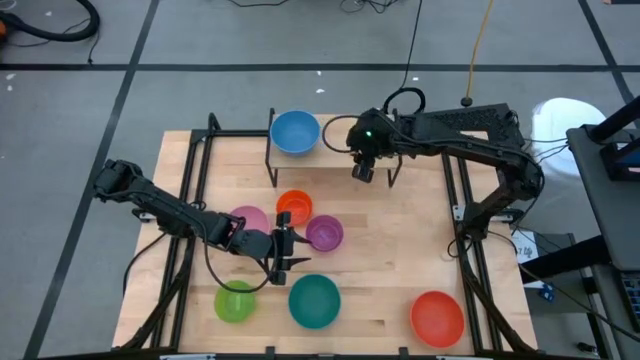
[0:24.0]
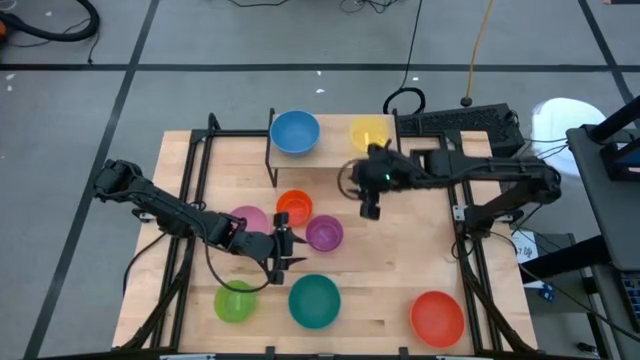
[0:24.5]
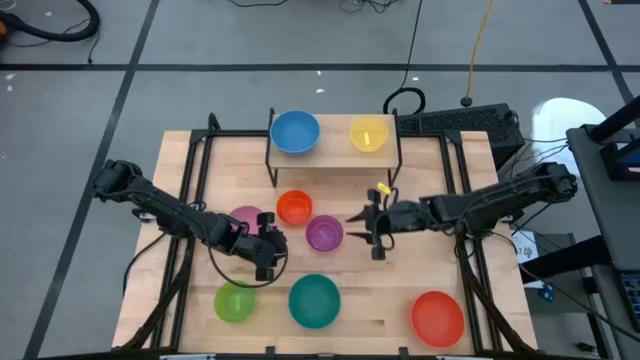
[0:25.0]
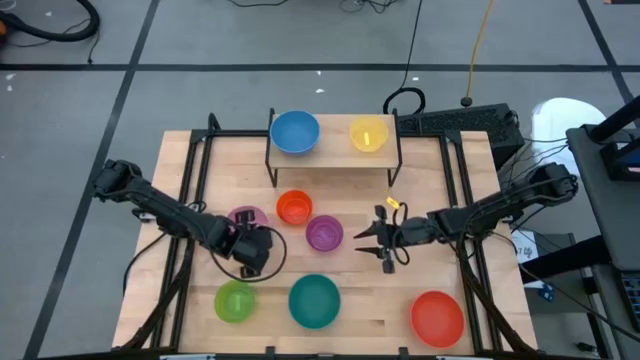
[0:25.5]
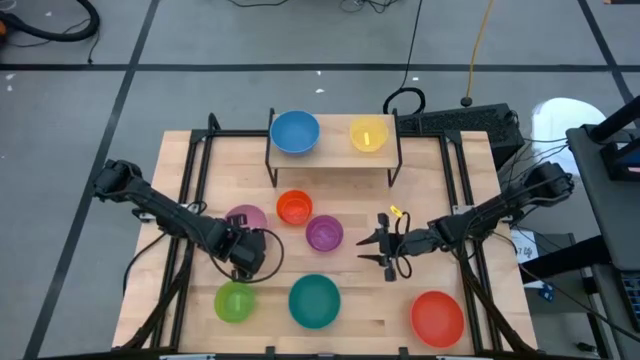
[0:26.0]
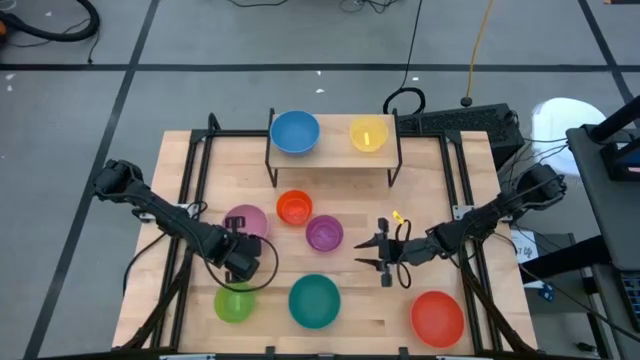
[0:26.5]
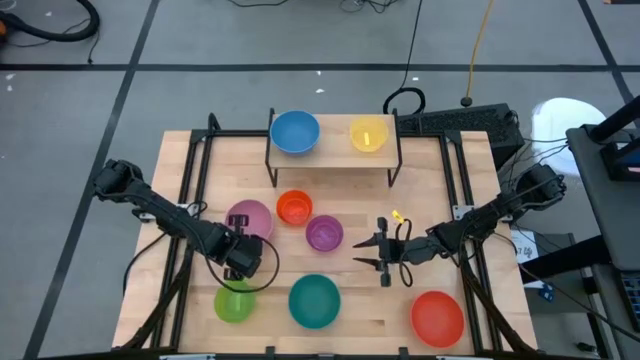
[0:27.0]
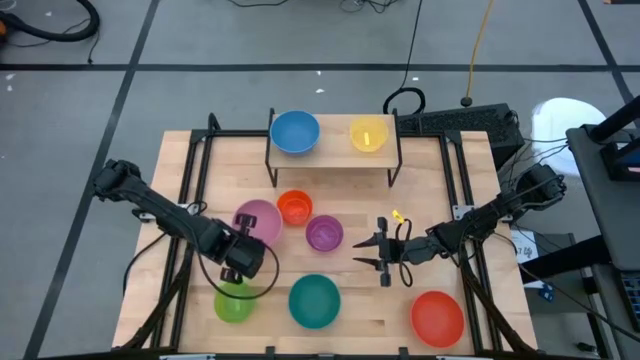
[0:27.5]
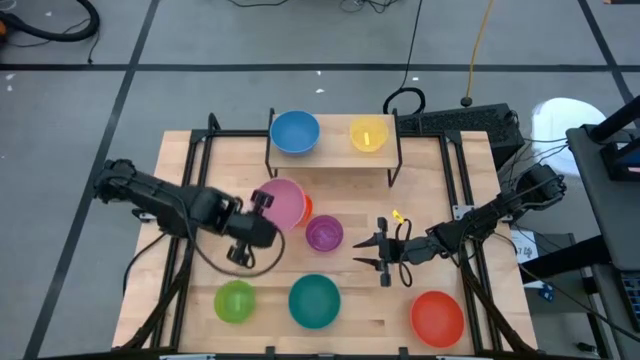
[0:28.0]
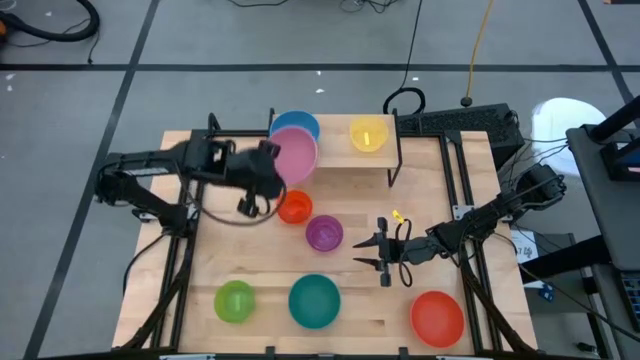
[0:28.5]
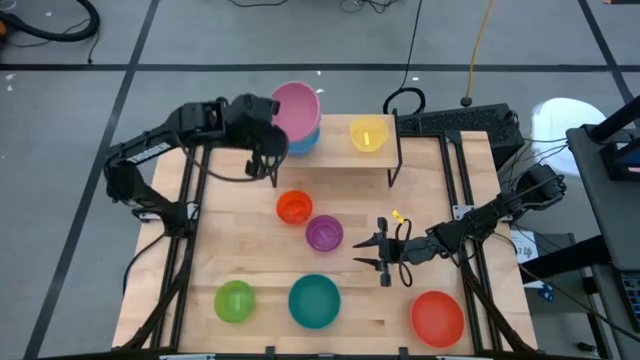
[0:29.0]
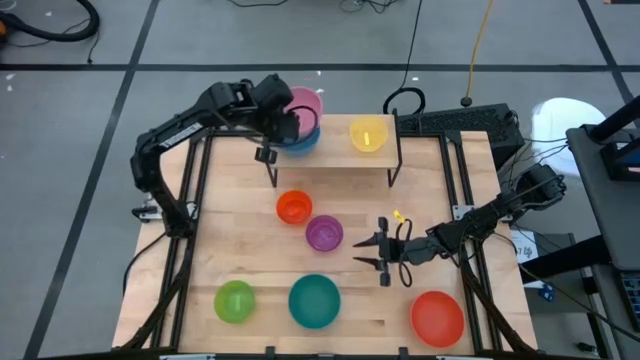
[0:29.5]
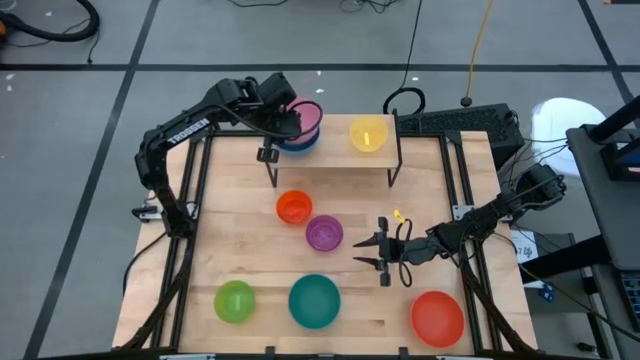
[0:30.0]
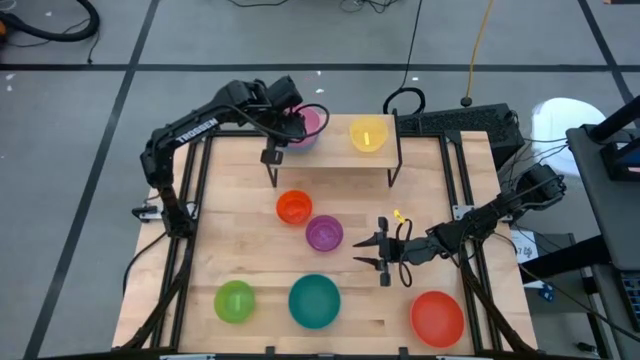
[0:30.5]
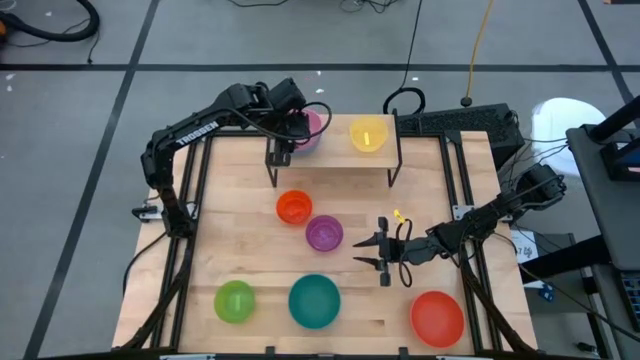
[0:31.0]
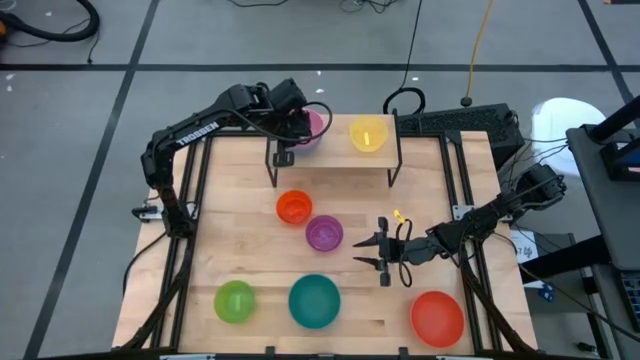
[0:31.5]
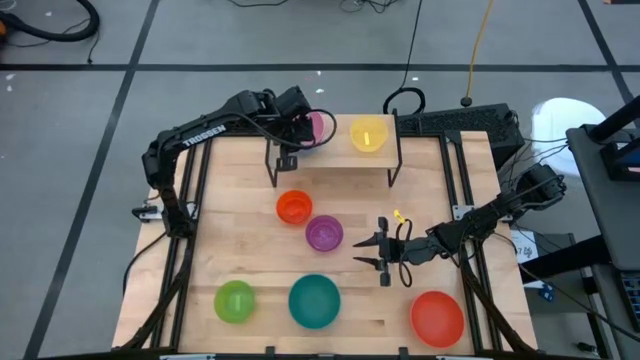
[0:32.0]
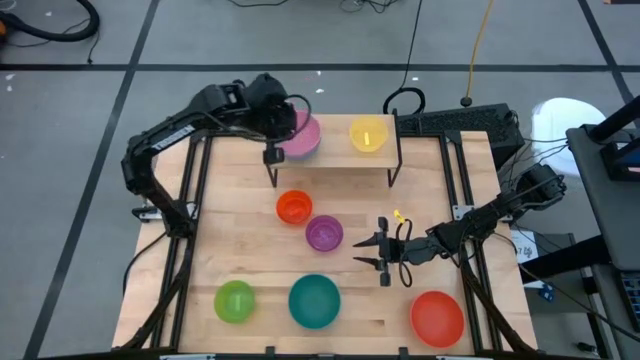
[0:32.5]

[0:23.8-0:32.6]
Task: Place and stack bowls onto a shelf
Stack the pink bowl on top of the blue bowl on the shelf

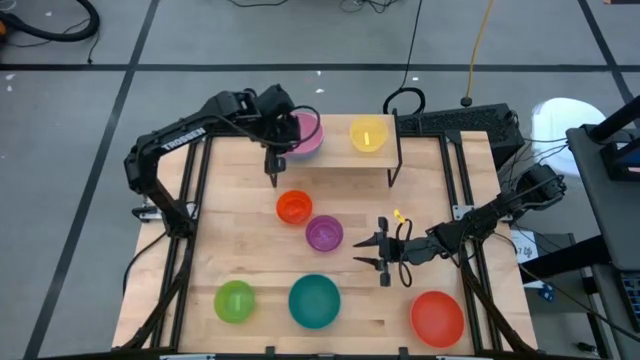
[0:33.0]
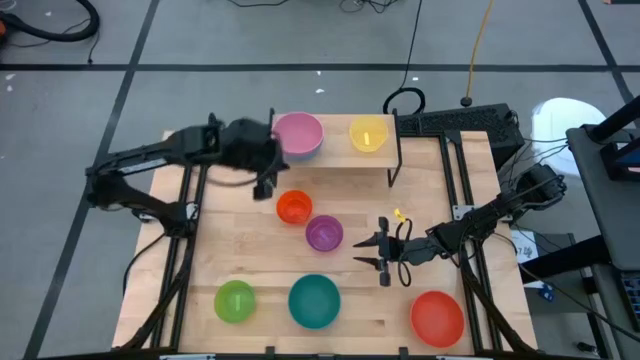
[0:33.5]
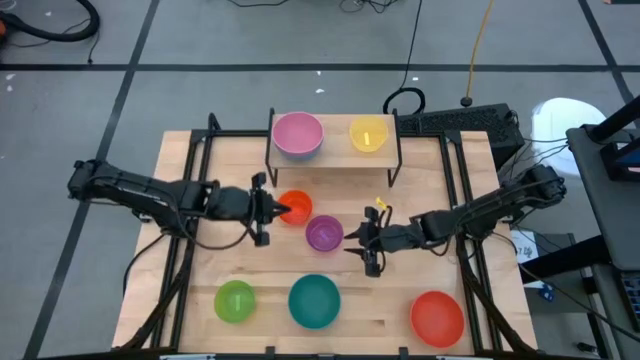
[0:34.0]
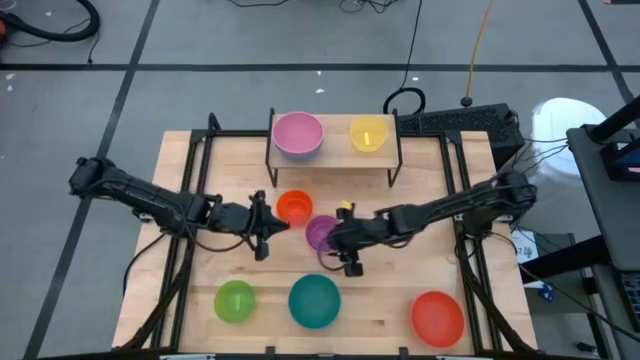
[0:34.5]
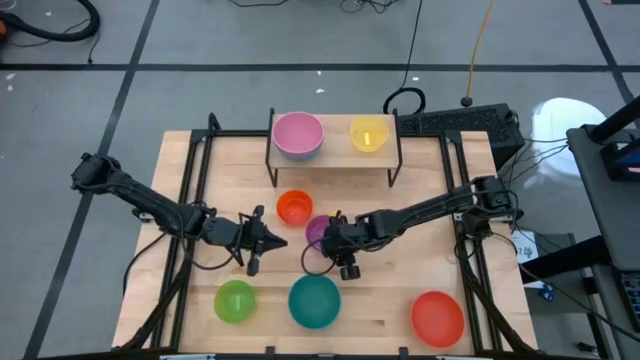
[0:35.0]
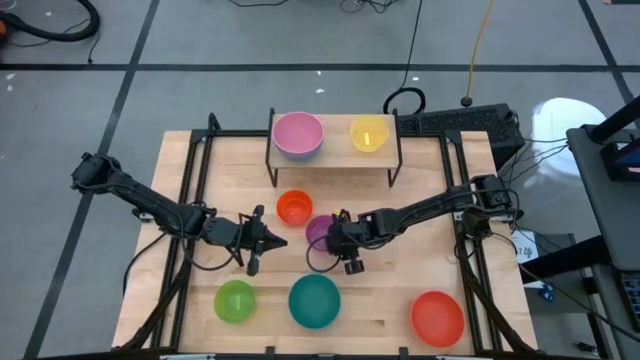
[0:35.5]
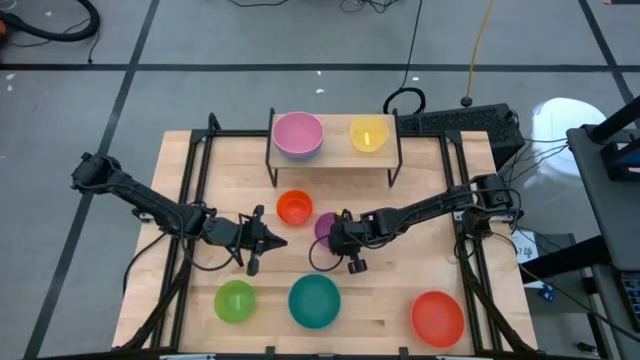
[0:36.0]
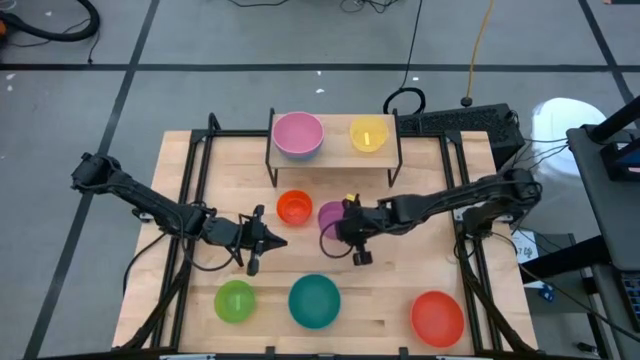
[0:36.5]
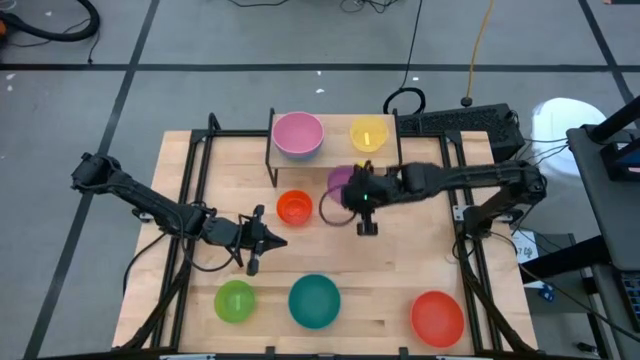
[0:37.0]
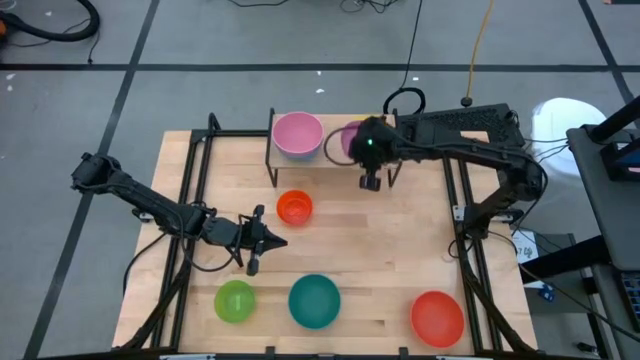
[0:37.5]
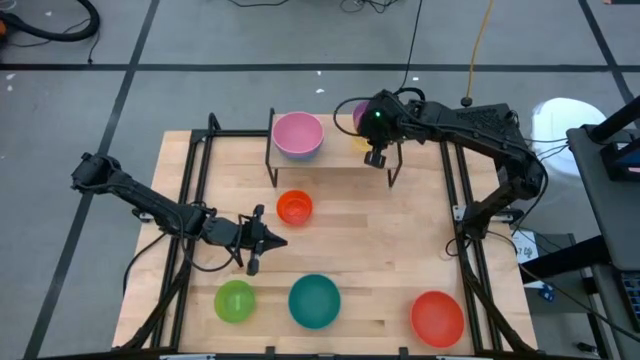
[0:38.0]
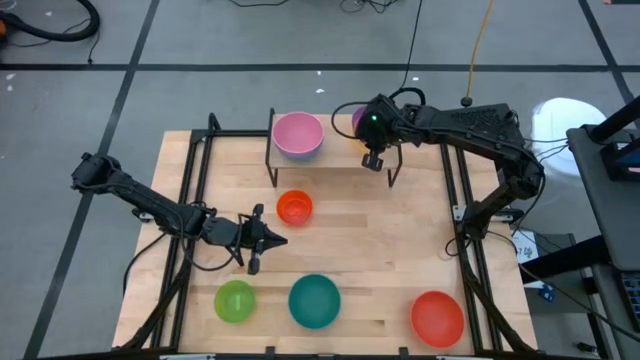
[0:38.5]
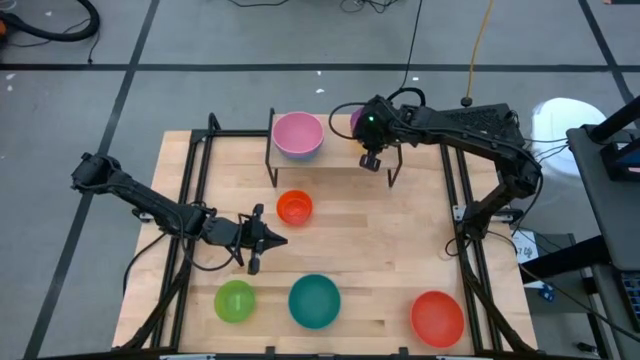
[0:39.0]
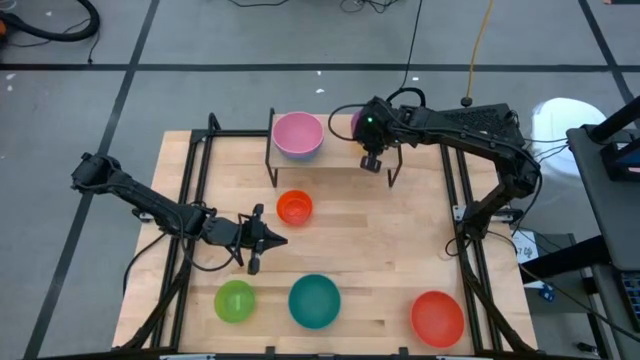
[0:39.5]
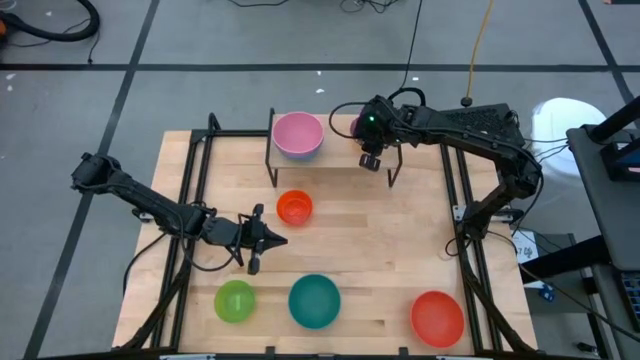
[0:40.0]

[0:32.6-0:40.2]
Stack the purple bowl on top of the yellow bowl on the shelf

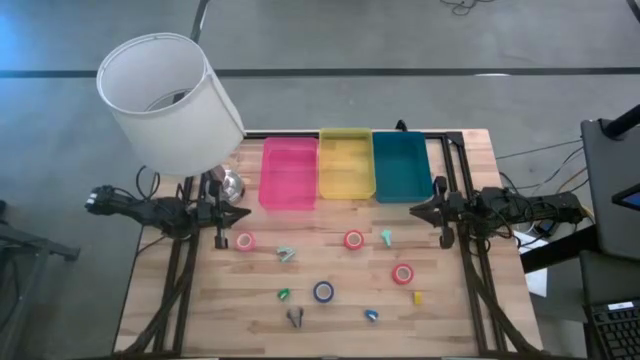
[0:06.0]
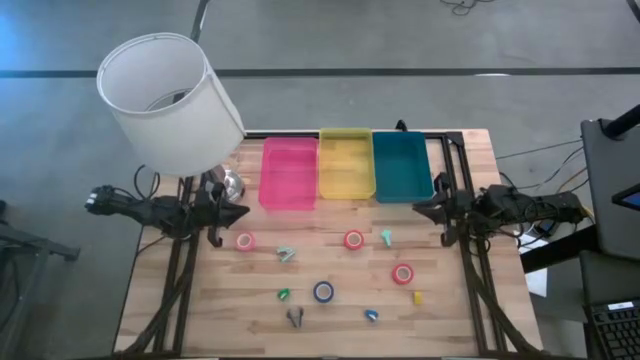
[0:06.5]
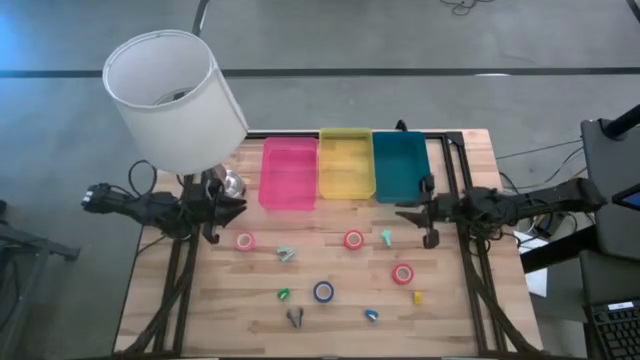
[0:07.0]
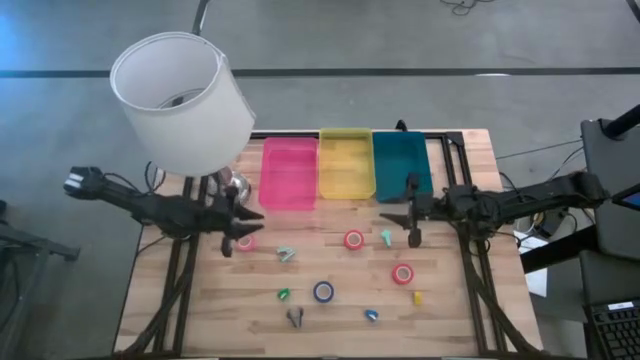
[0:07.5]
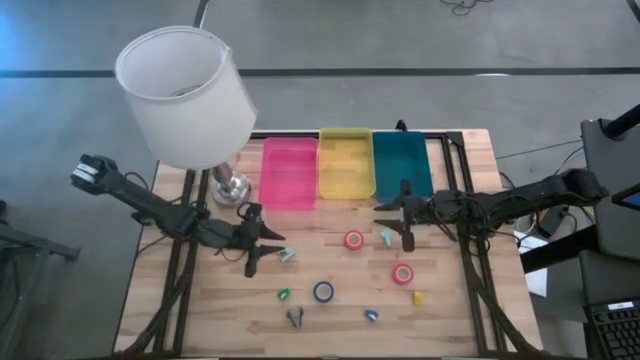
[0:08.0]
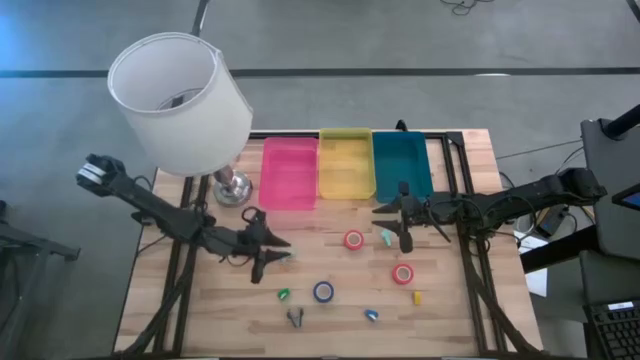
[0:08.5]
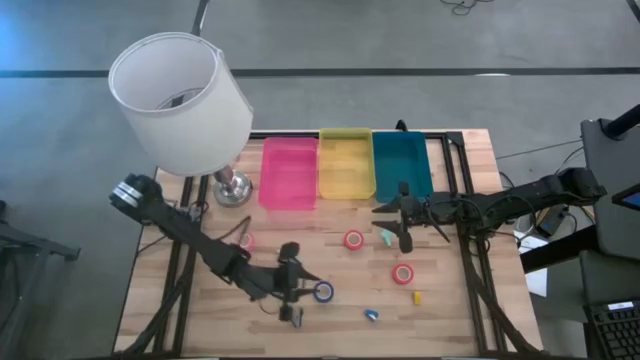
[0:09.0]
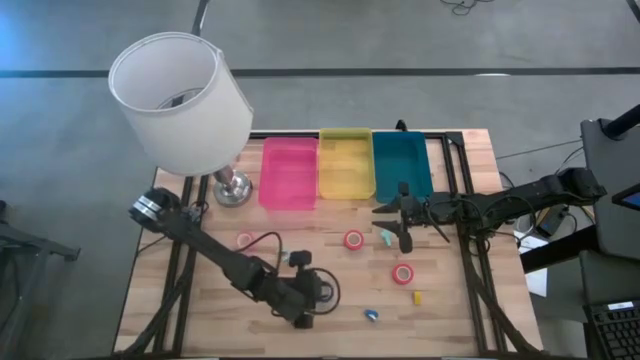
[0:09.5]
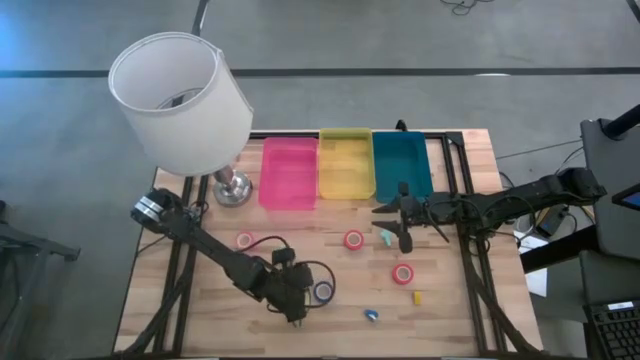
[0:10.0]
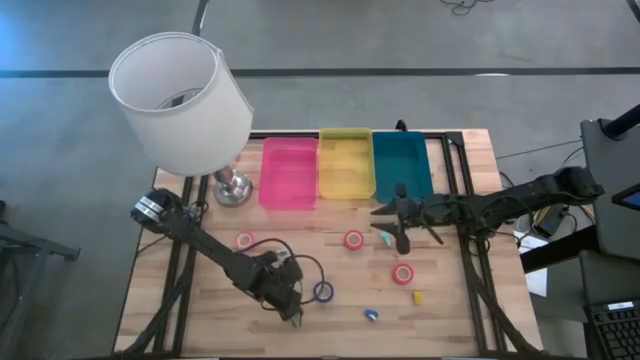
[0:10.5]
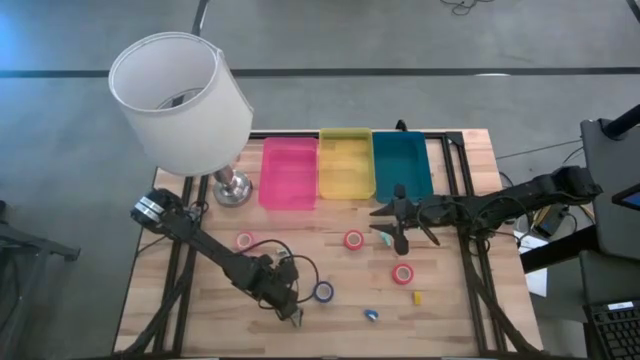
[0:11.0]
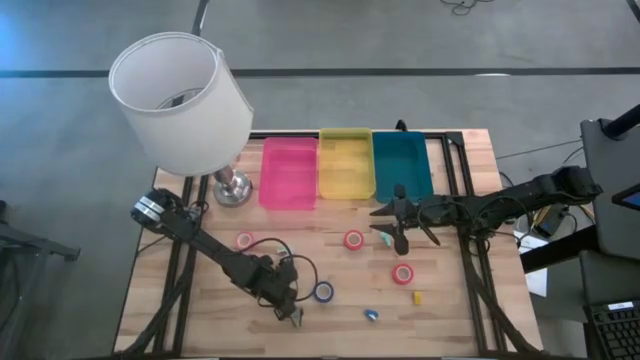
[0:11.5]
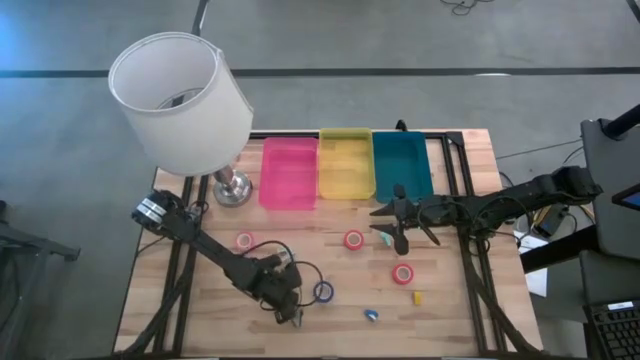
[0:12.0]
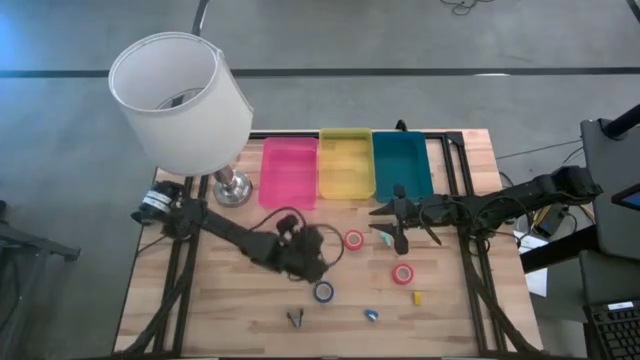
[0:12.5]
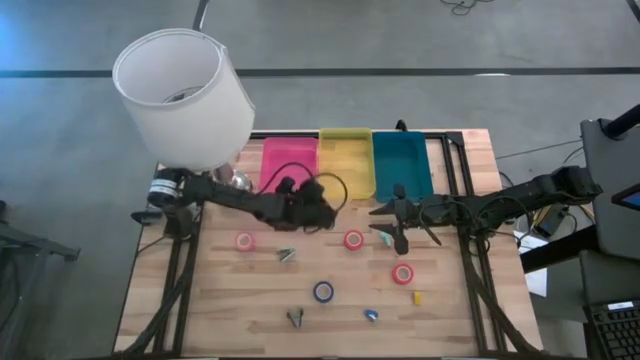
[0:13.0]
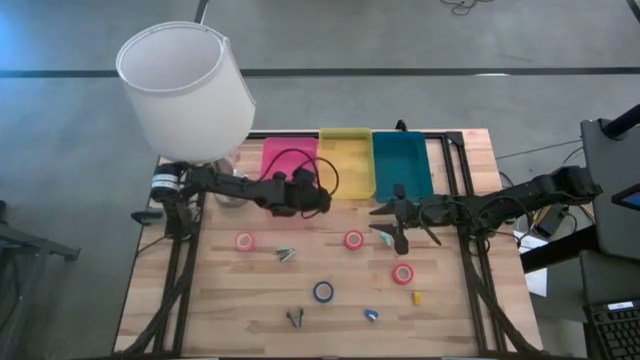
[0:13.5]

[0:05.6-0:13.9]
Task: Pick and place Stapler, Stapler remover, tape
Put the green stapler into the pink bin
